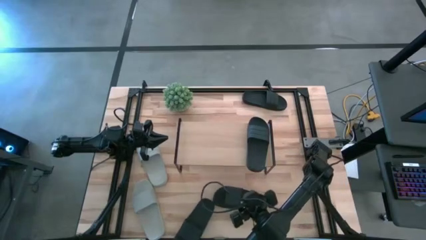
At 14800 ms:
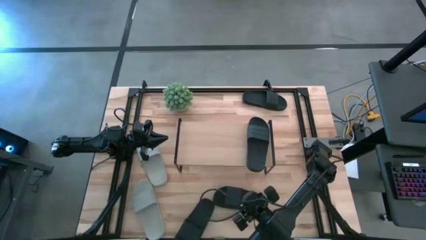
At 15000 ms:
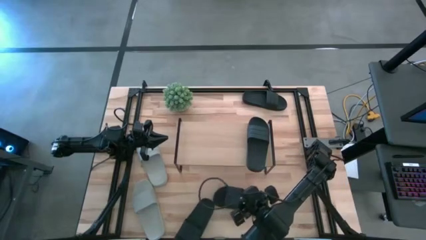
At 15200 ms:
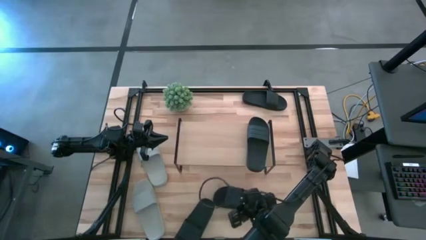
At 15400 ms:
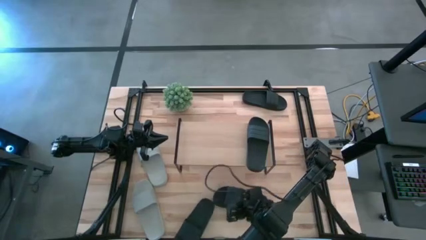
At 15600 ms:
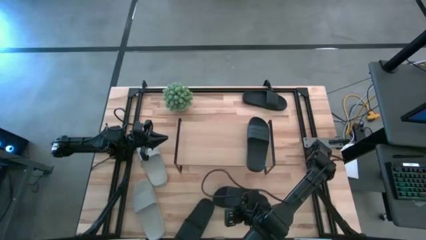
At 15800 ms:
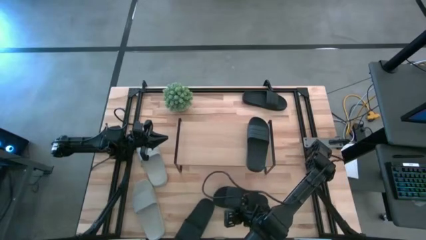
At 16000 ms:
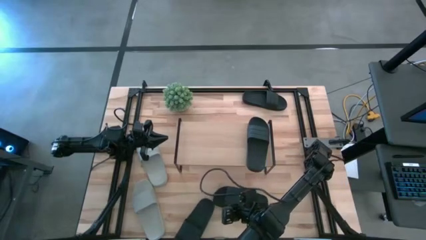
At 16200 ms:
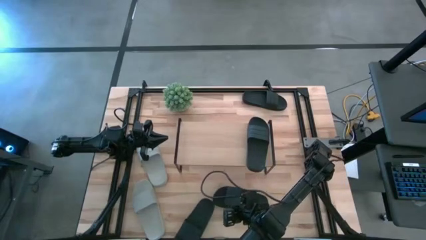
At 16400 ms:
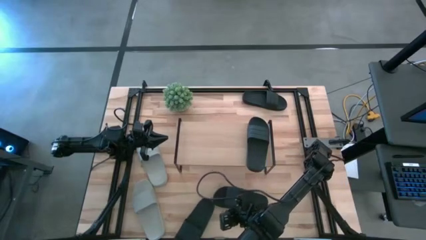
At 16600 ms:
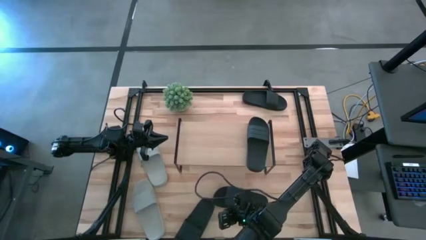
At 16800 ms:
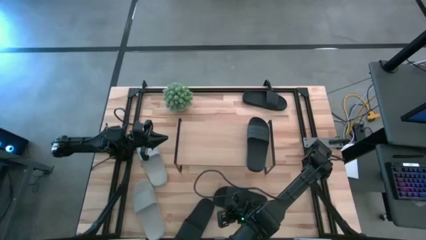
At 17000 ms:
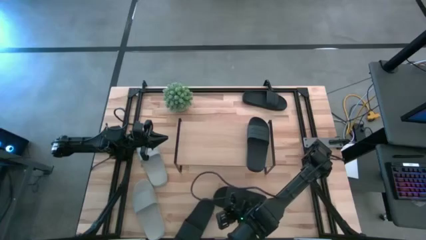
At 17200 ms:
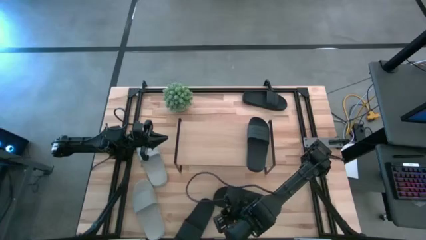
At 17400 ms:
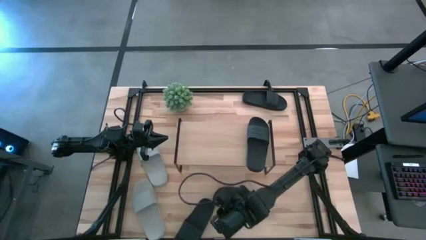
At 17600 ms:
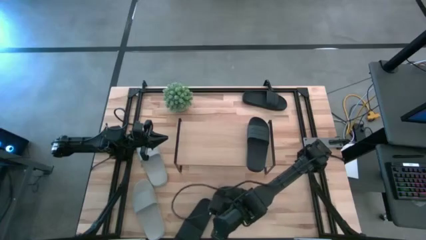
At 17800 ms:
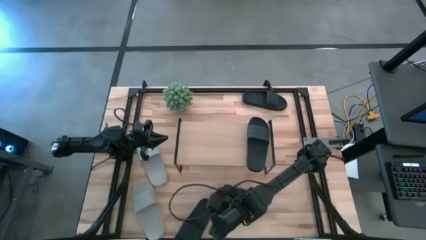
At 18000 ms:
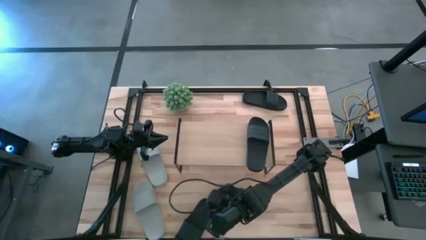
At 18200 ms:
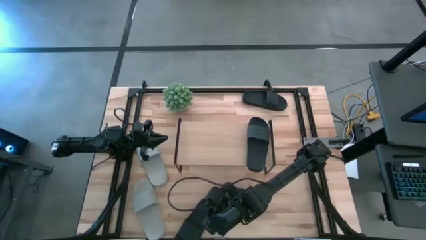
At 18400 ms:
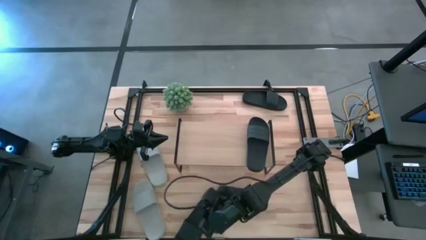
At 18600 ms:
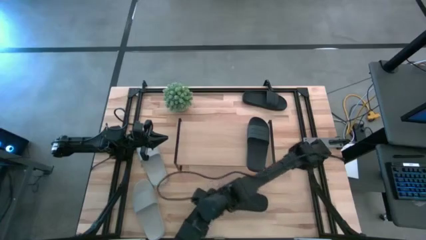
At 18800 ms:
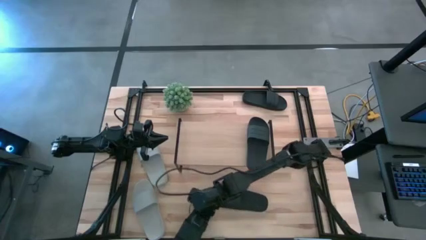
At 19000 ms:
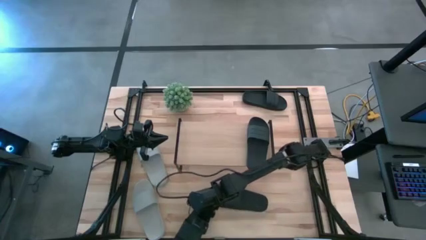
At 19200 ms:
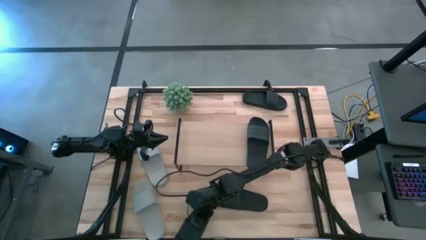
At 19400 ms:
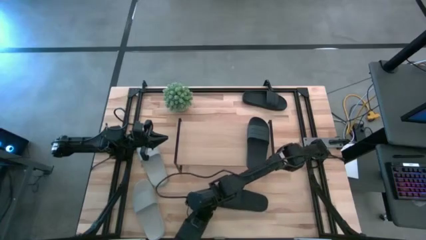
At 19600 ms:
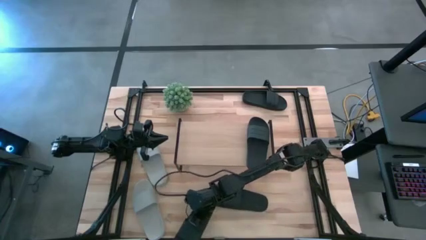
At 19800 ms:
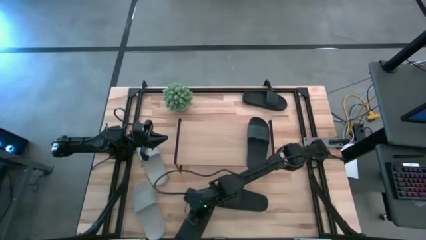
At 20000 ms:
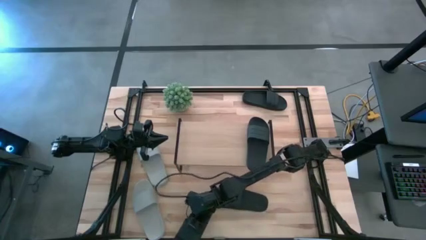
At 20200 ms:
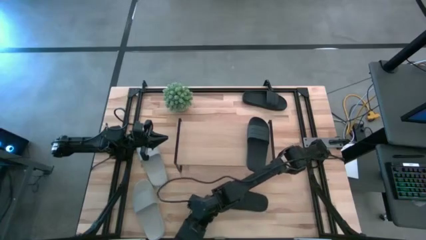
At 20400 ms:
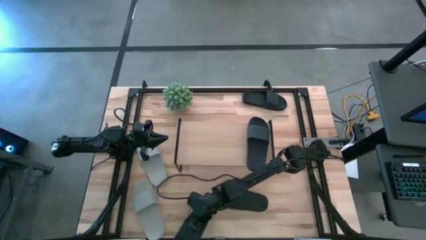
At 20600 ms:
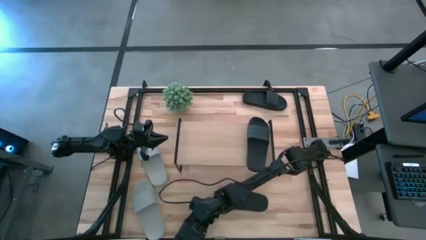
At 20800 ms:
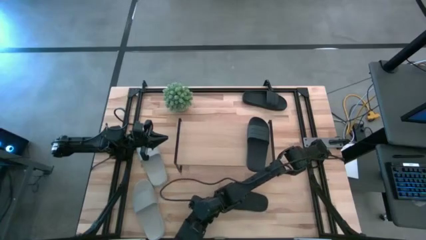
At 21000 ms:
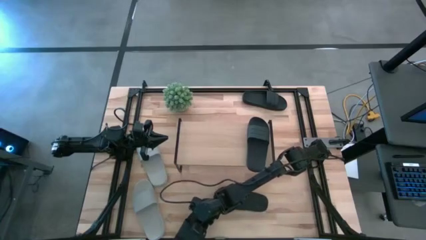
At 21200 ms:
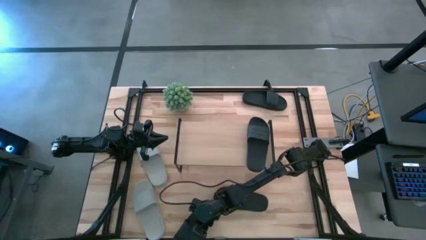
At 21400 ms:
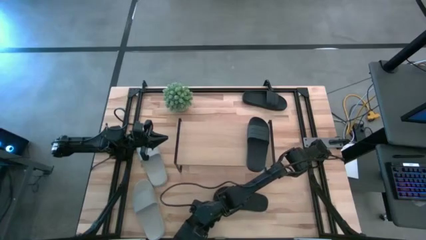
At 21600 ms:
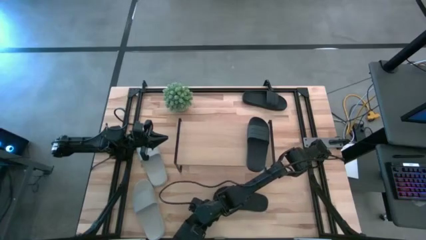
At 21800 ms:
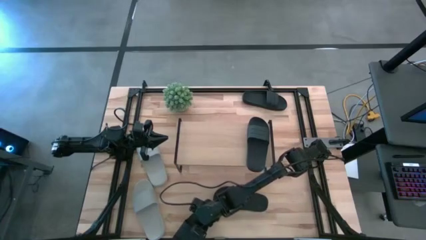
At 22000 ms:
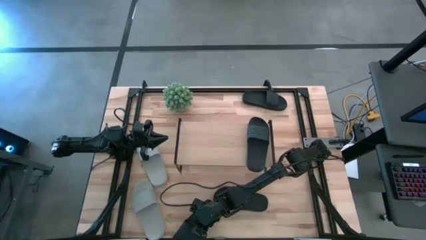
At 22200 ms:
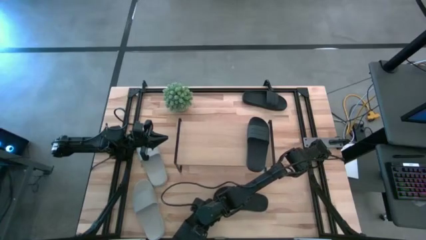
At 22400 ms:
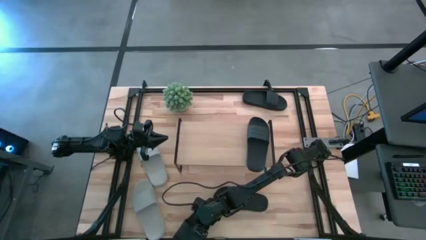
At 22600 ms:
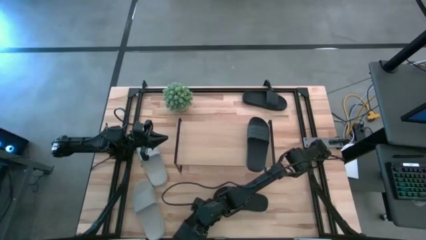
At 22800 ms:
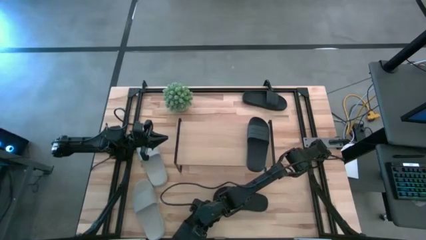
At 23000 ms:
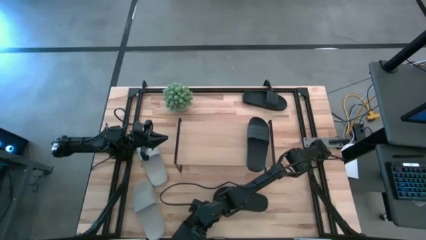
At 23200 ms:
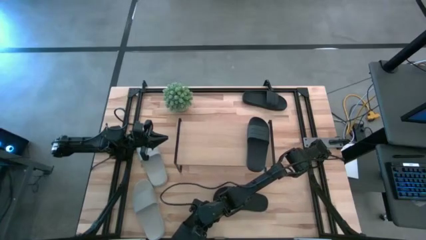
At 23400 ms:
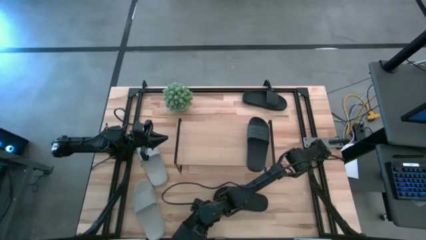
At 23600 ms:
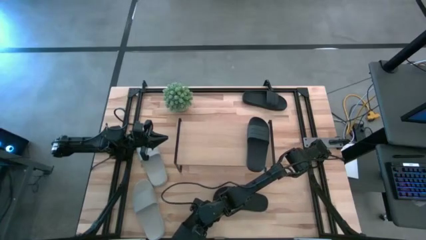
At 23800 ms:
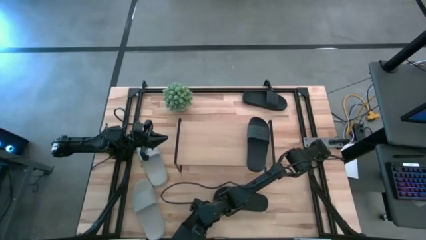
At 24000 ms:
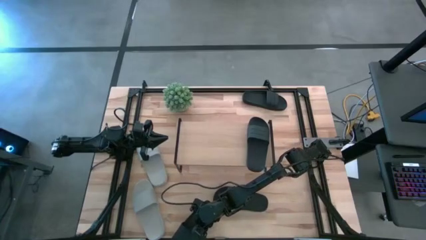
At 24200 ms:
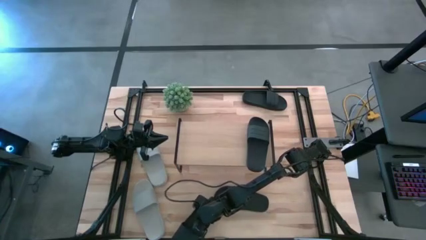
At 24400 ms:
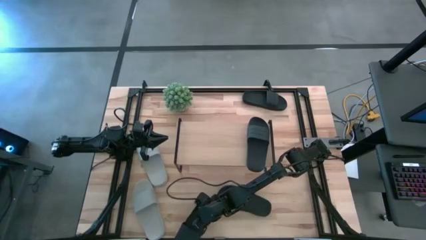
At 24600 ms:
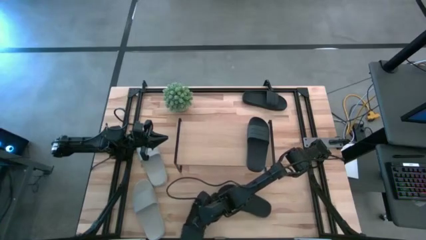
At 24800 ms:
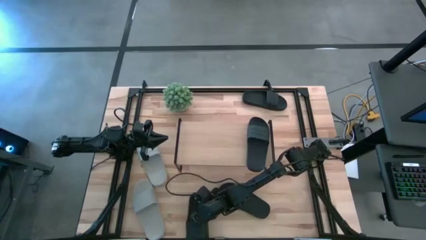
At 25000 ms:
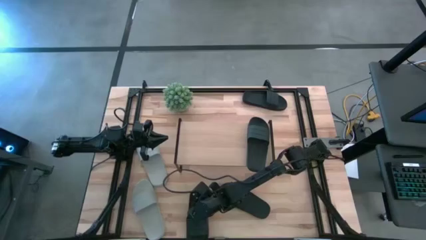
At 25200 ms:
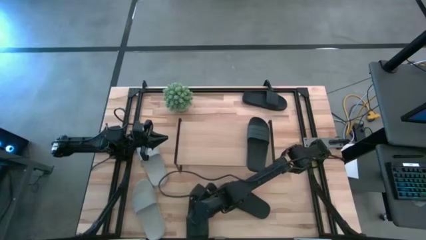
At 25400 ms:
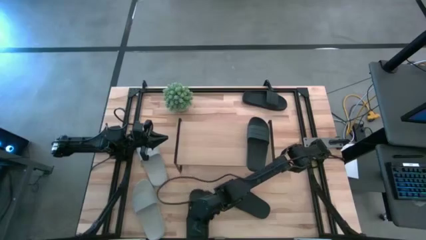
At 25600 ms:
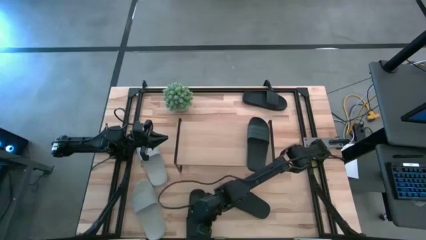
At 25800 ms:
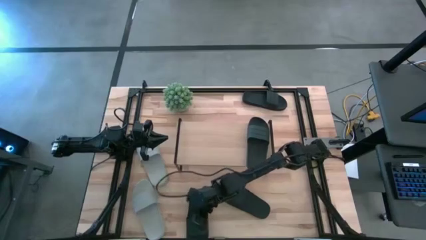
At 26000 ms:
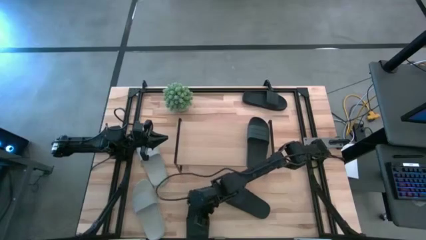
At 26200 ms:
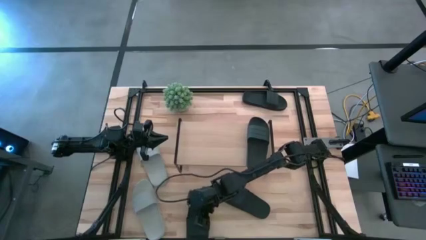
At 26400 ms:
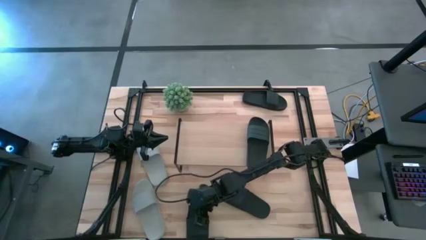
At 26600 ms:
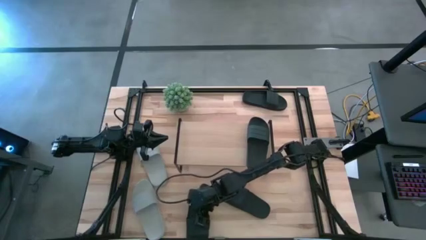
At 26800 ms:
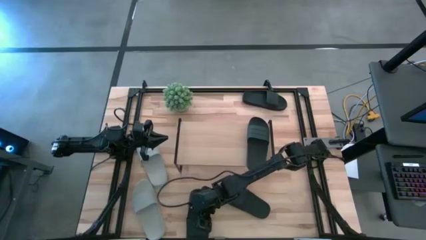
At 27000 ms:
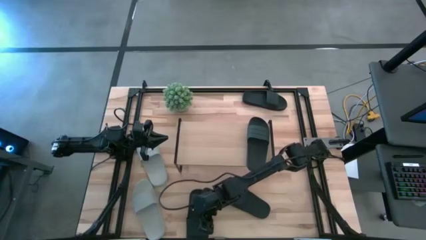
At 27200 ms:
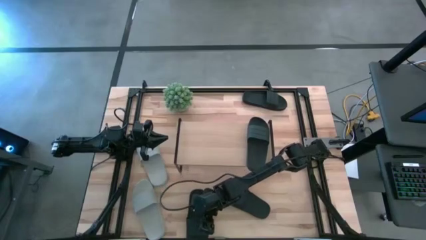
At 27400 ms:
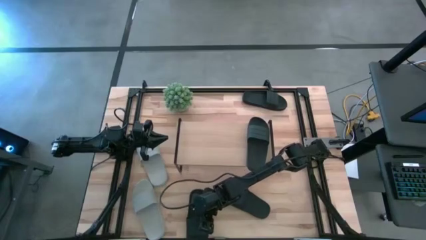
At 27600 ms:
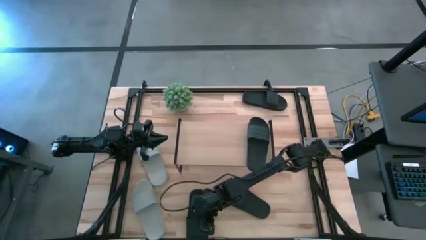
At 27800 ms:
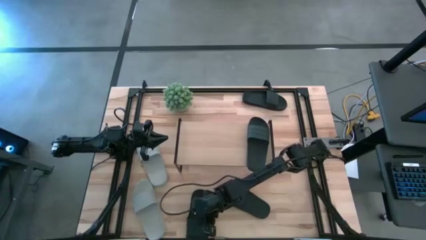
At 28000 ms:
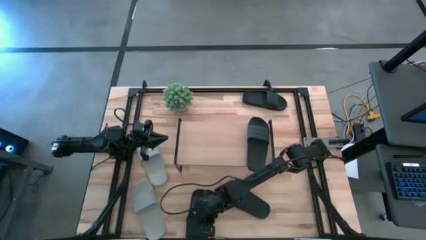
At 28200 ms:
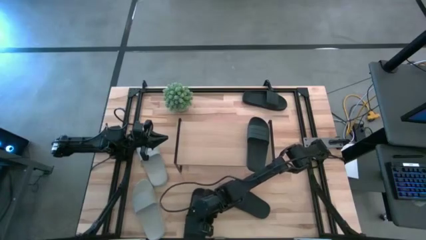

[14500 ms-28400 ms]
Task: Pick and place slides into the shelf
Put the black slipper on the shelf
